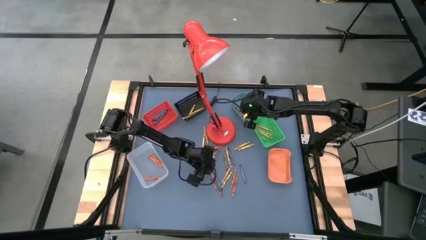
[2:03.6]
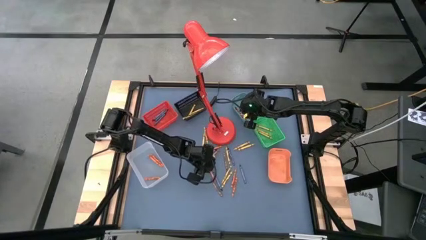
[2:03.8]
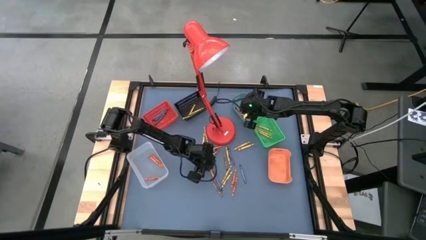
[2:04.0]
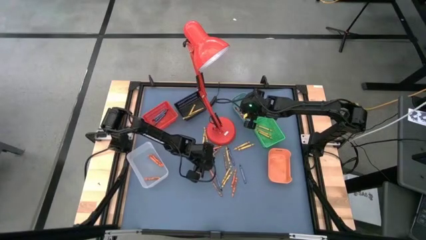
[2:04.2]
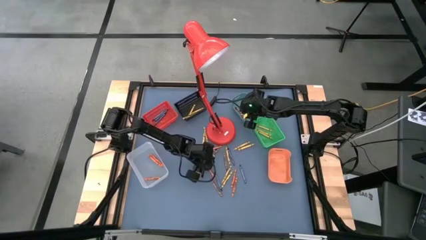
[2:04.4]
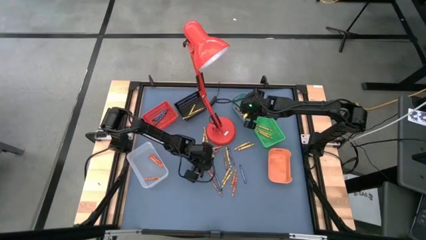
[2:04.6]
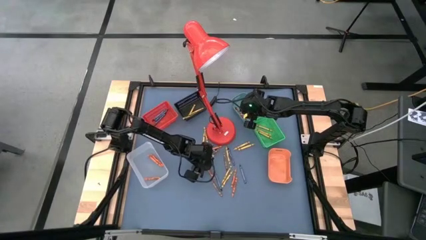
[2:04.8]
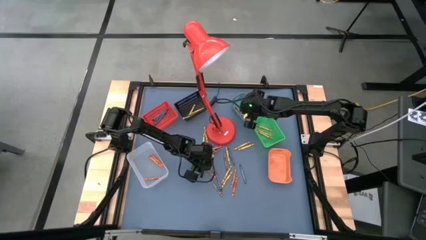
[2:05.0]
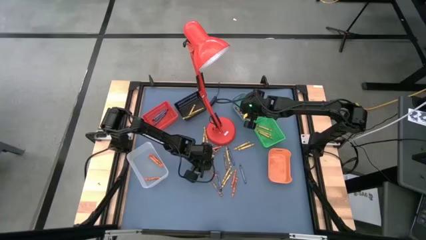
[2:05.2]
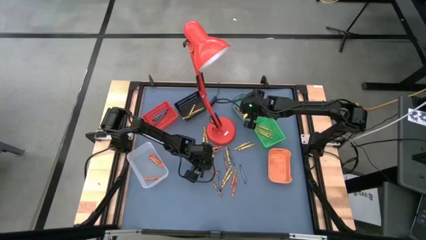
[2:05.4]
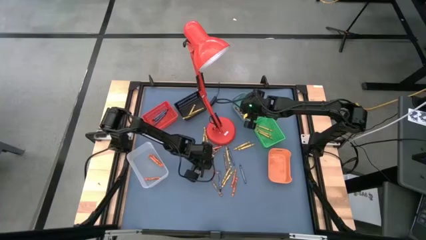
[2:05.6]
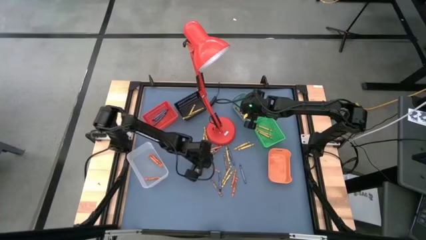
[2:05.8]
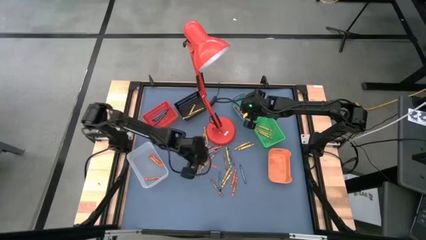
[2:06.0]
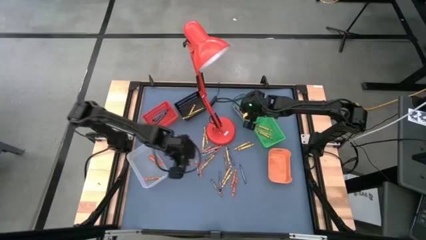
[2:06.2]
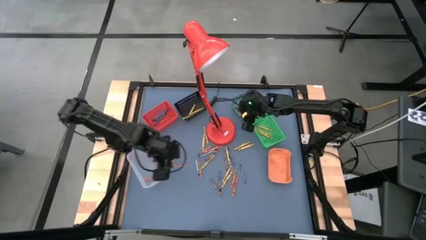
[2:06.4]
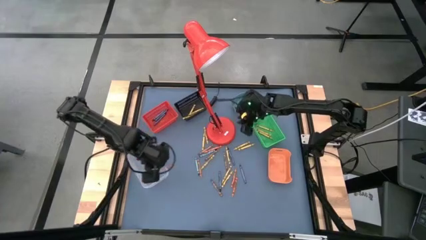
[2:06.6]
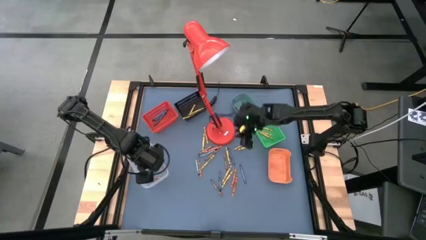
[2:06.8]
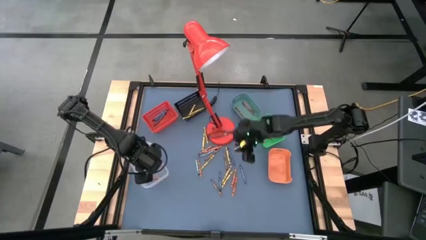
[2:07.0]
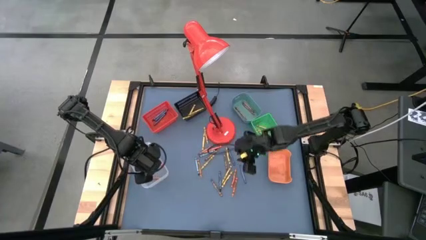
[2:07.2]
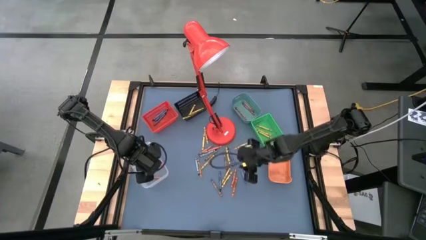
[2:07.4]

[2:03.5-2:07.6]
Task: Sort crayons
Put the orange crayon into the bottom left transparent bin

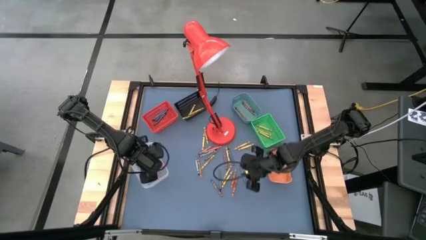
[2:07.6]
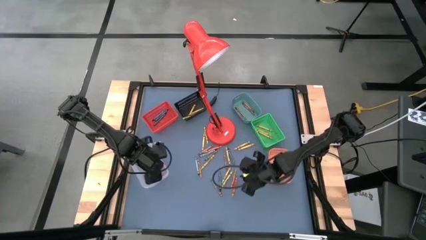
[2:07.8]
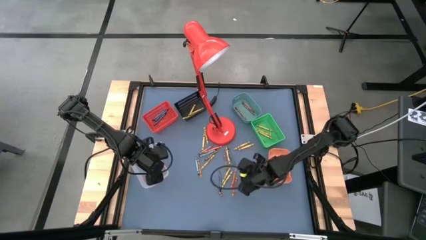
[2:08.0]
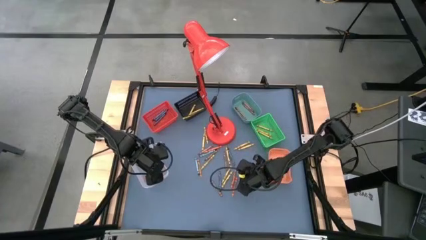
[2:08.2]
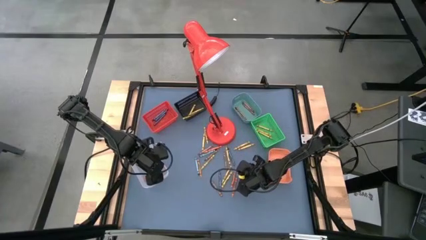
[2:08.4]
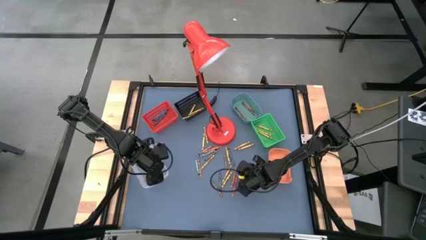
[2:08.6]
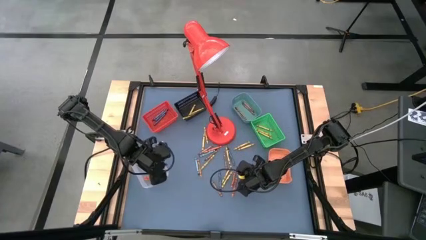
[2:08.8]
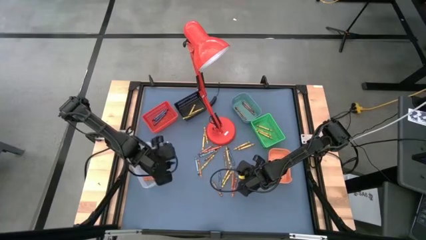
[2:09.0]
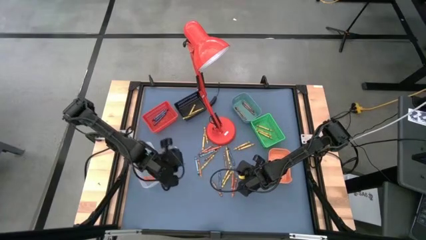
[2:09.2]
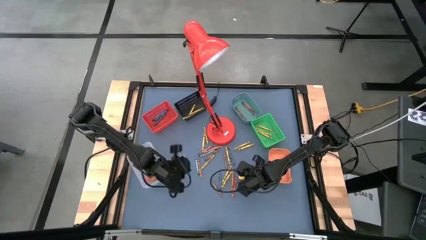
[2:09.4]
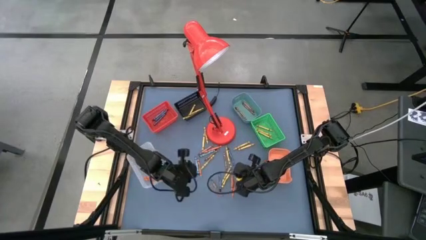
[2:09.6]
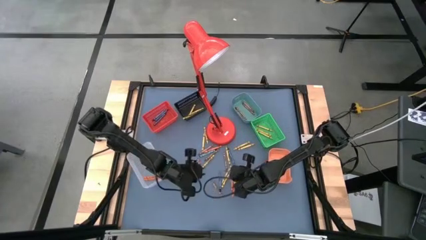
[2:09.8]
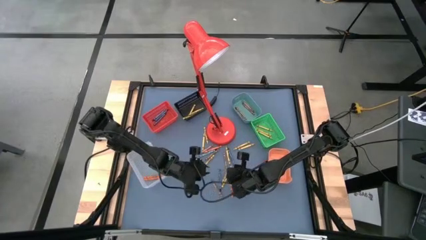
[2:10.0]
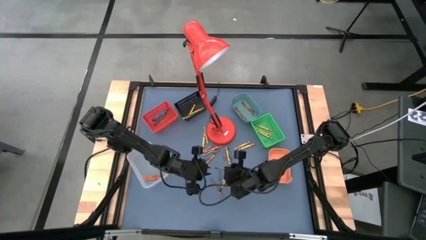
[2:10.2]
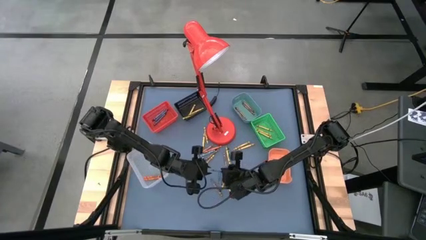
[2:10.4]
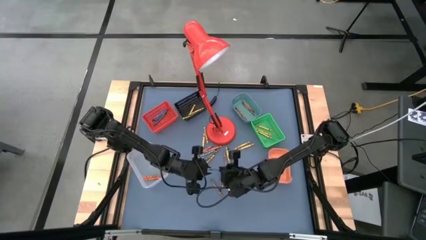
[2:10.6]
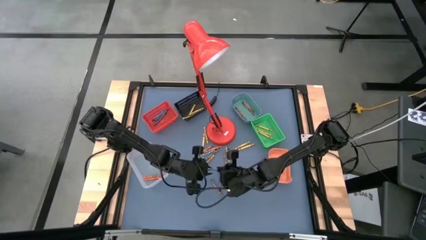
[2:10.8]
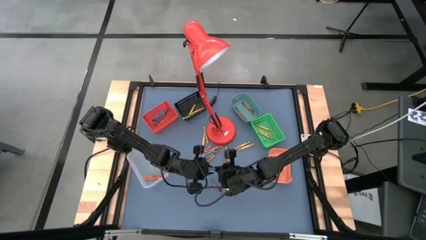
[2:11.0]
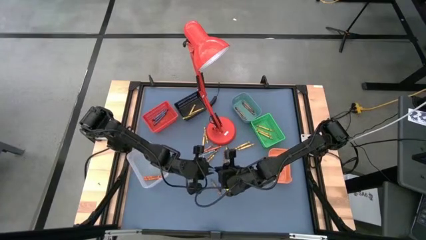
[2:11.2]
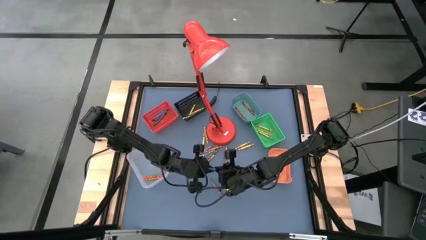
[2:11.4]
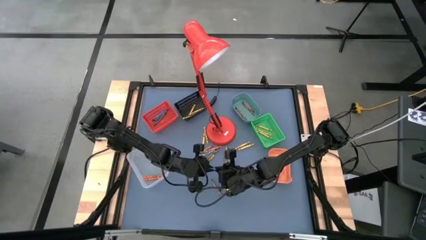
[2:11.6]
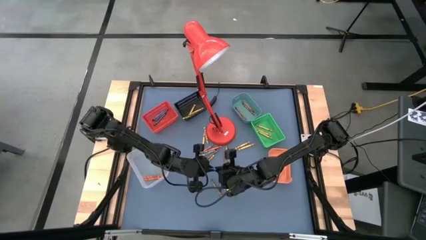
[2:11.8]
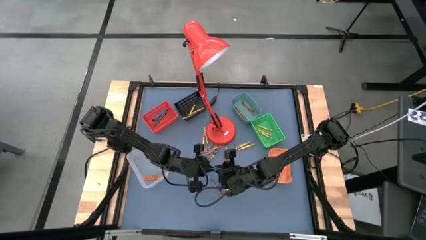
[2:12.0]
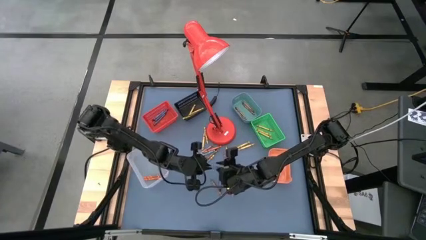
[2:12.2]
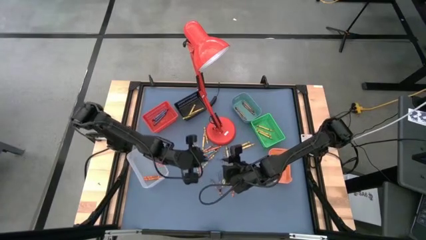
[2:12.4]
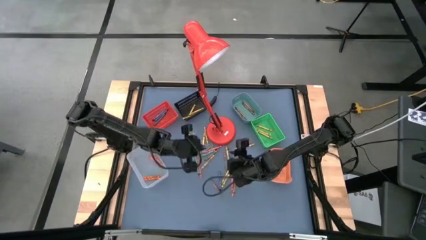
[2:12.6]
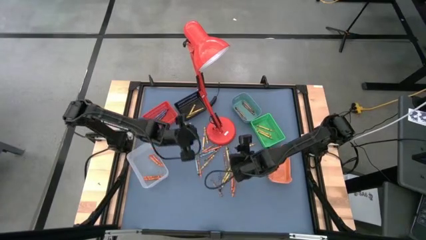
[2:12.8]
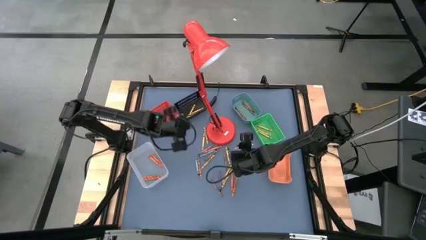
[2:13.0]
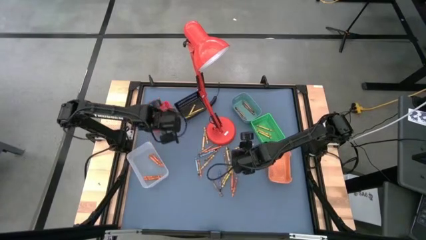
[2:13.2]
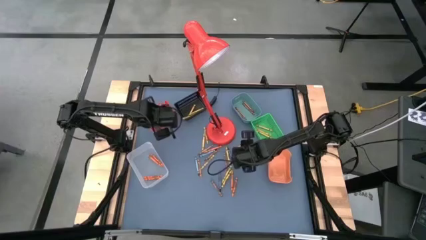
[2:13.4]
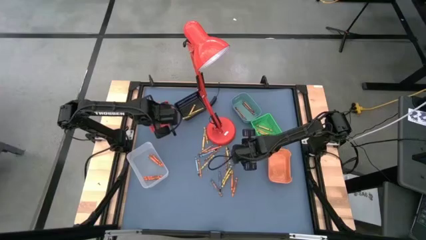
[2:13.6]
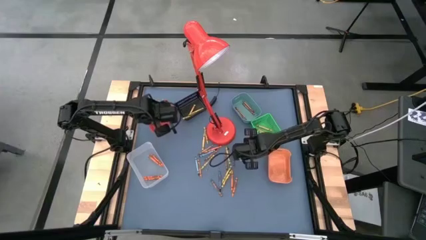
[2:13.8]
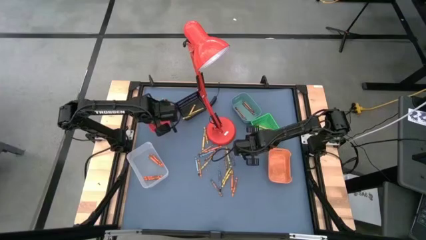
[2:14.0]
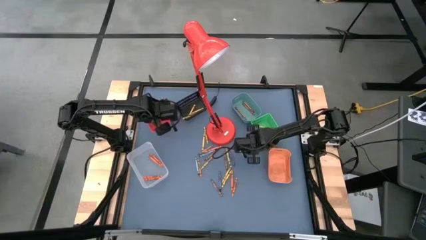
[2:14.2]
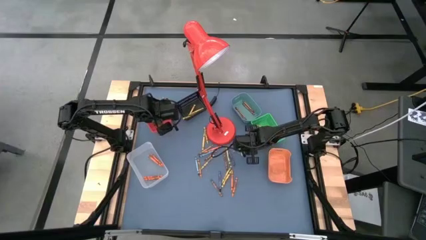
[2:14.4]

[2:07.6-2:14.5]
Put the blue crayon into the middle left red bin

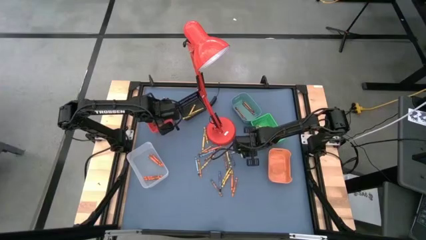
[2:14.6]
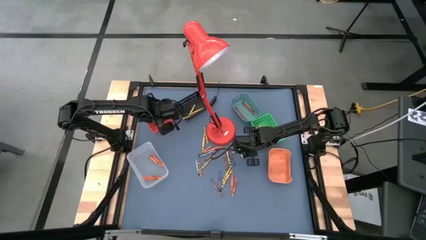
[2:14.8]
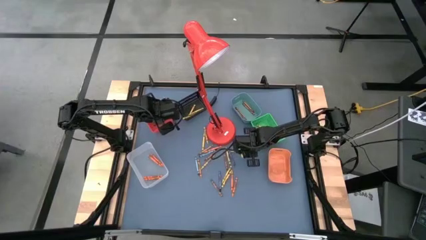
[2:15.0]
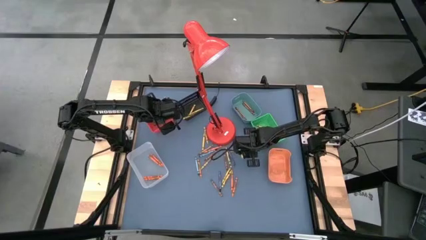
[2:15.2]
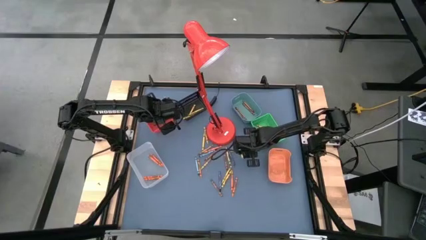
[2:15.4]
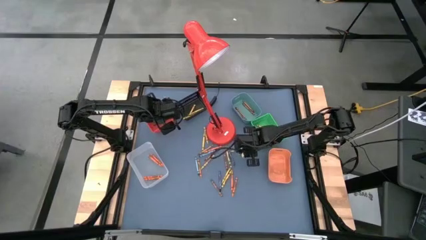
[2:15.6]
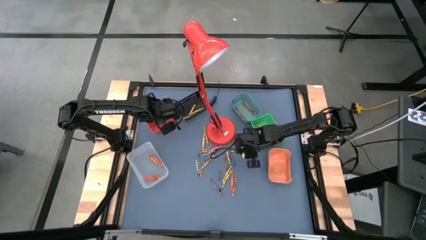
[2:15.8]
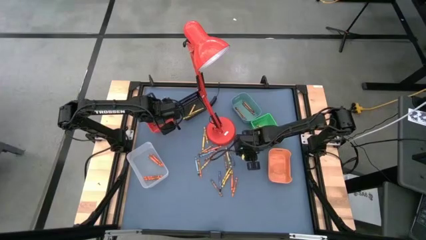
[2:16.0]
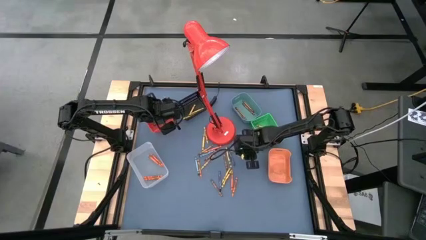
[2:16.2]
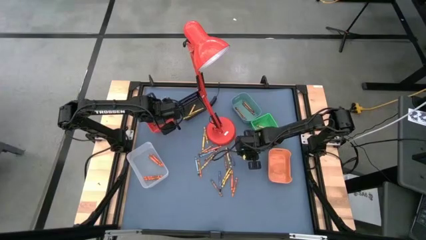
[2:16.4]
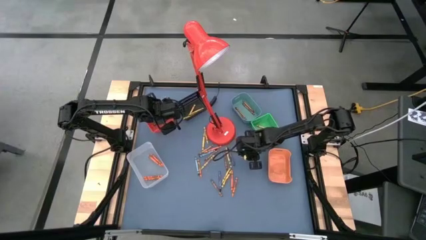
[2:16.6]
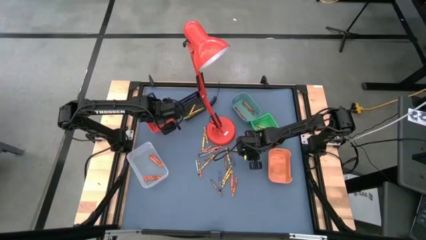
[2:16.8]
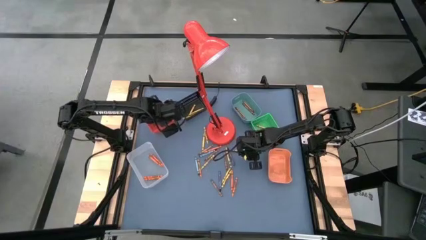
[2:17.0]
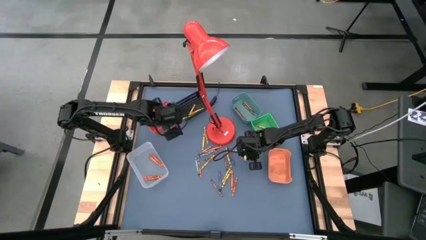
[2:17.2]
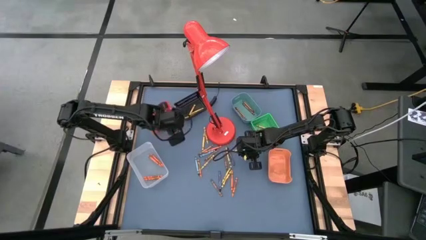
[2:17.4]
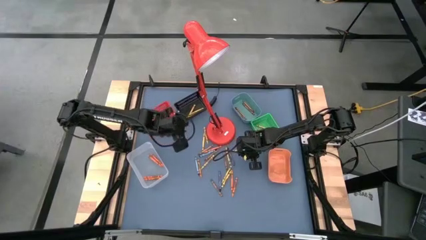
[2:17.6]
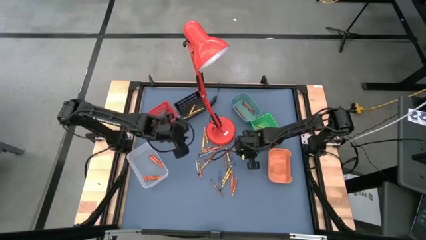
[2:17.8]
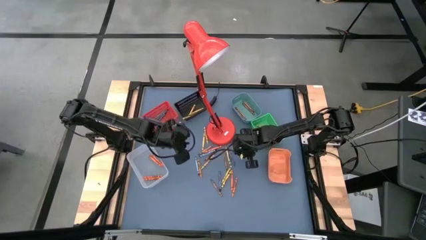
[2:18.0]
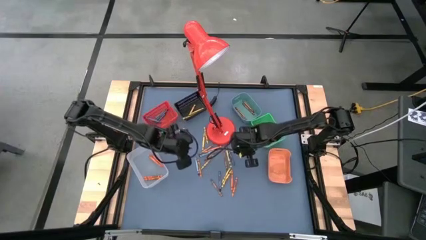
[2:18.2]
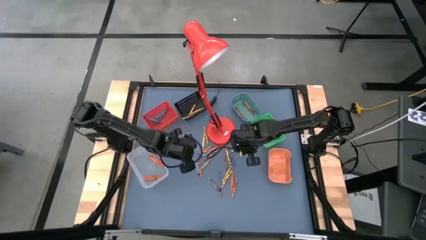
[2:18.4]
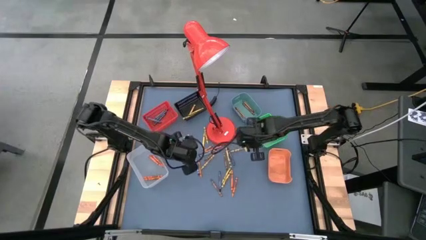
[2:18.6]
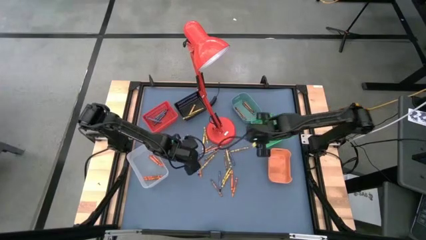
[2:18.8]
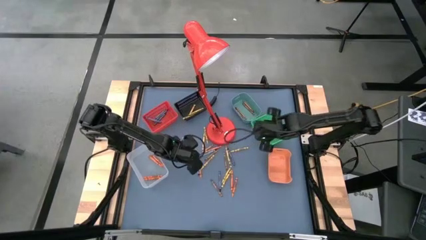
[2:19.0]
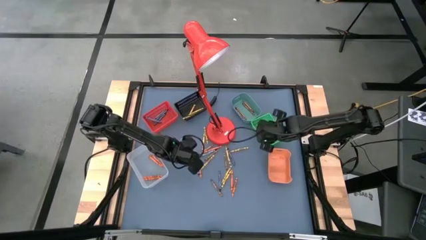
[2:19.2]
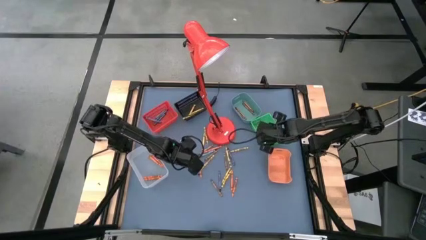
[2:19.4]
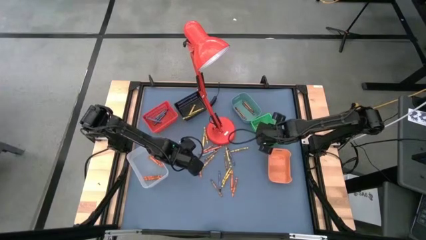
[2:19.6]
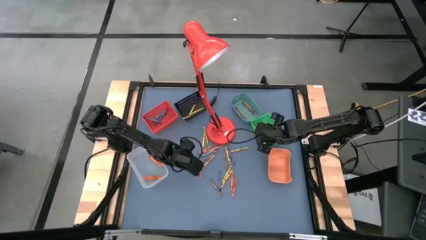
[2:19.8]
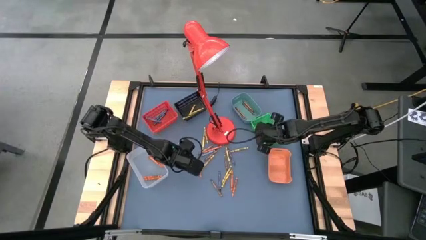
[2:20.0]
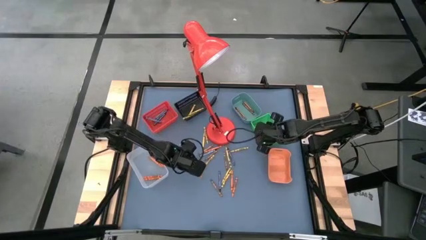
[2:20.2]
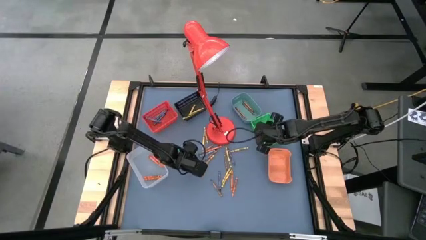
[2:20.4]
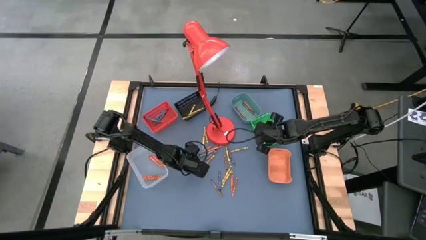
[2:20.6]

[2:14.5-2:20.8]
Put the yellow crayon into the middle right green bin
